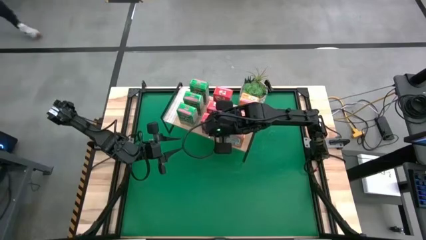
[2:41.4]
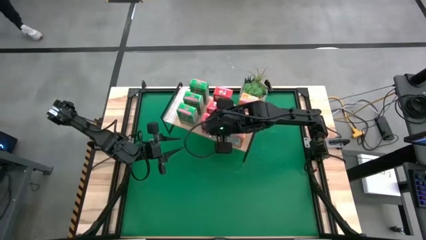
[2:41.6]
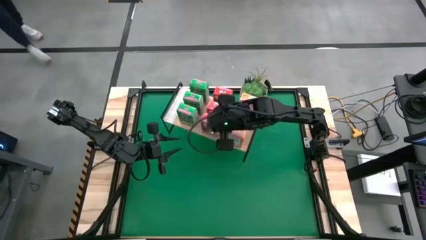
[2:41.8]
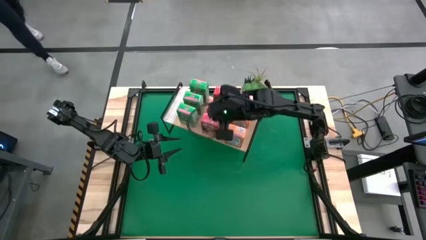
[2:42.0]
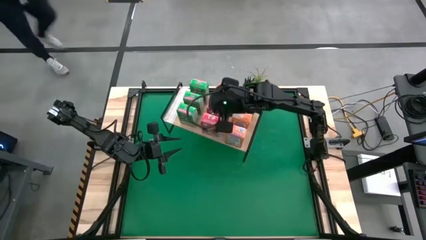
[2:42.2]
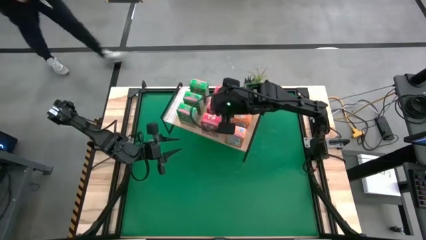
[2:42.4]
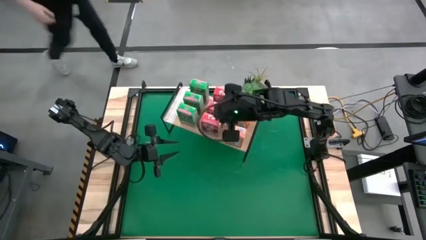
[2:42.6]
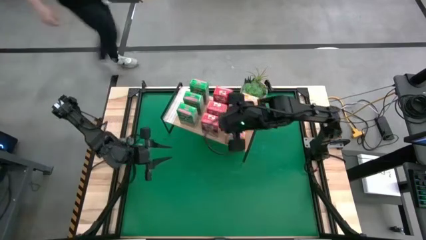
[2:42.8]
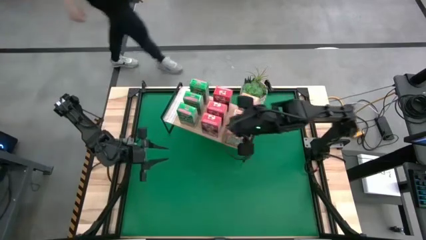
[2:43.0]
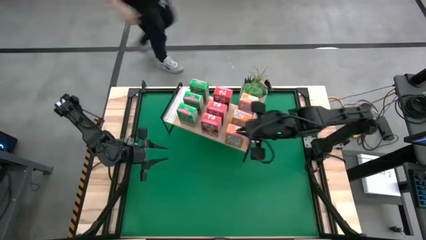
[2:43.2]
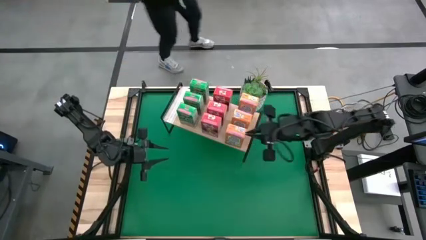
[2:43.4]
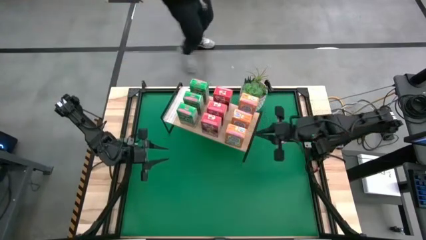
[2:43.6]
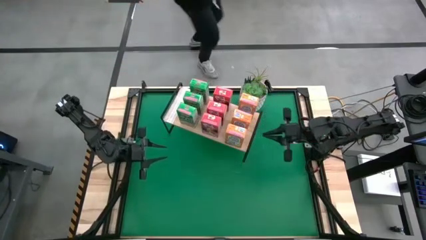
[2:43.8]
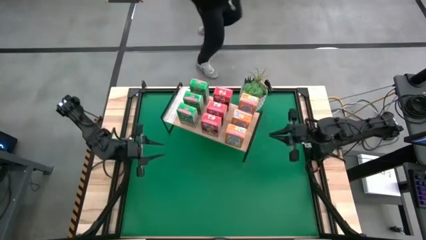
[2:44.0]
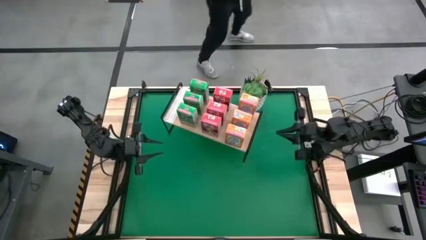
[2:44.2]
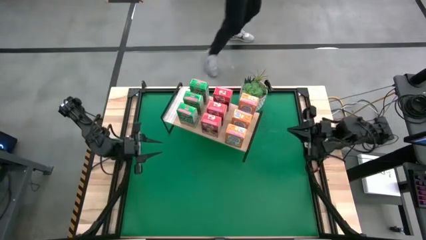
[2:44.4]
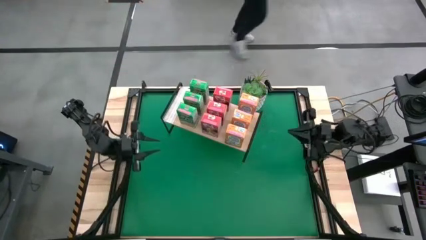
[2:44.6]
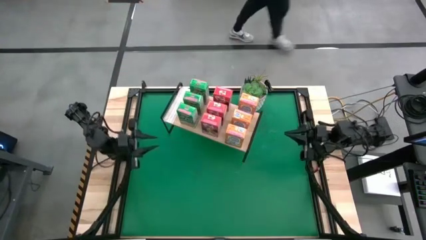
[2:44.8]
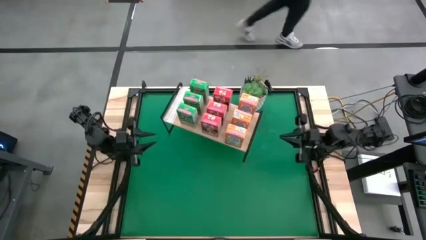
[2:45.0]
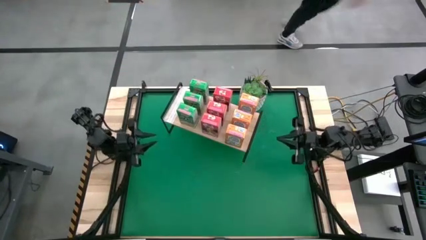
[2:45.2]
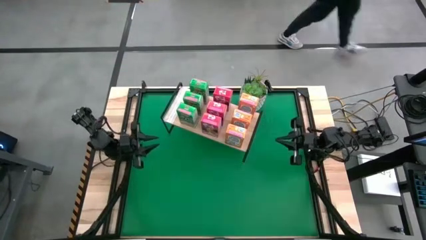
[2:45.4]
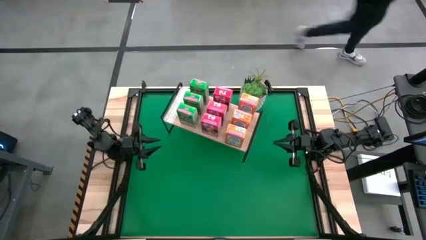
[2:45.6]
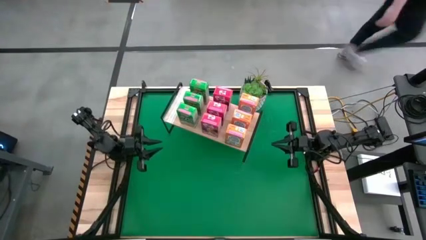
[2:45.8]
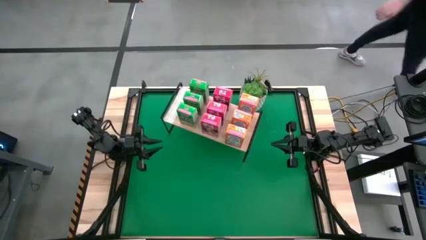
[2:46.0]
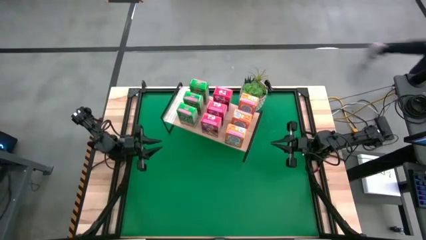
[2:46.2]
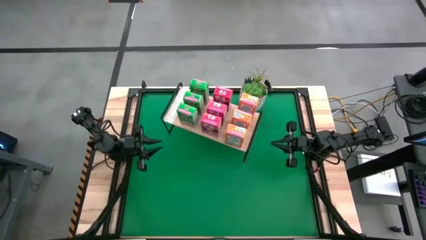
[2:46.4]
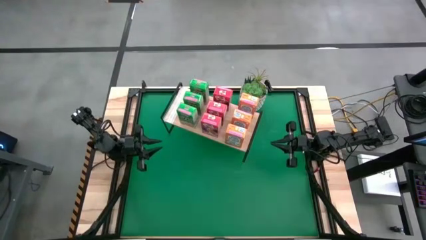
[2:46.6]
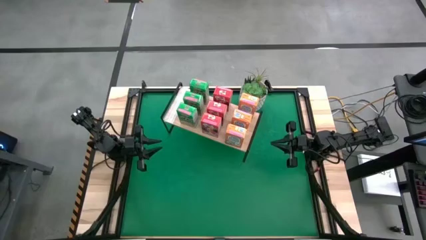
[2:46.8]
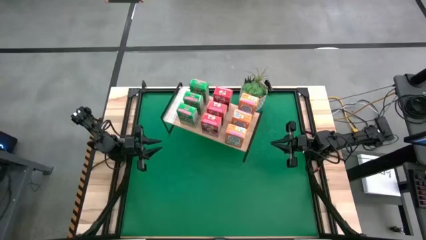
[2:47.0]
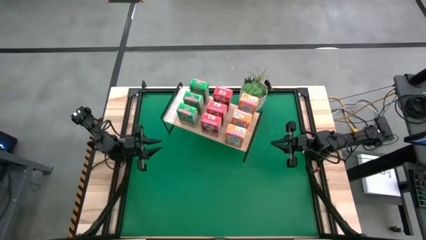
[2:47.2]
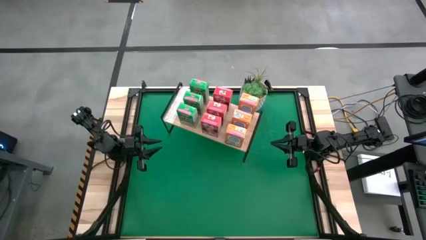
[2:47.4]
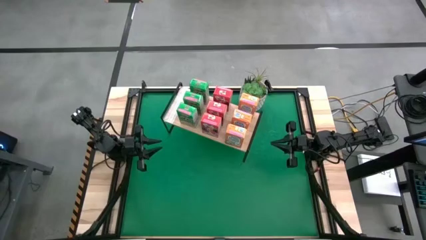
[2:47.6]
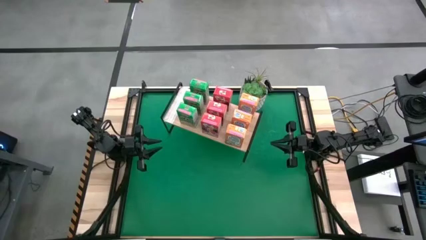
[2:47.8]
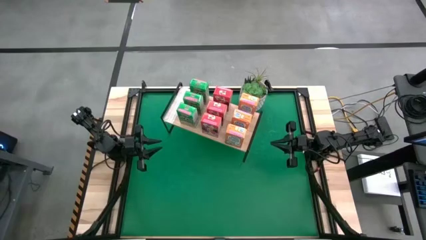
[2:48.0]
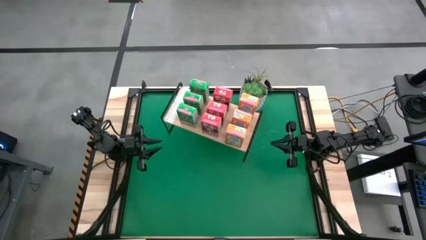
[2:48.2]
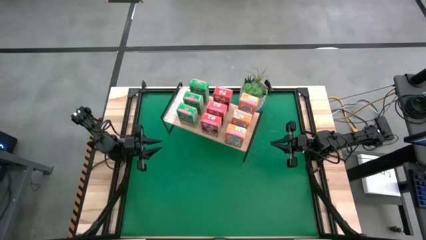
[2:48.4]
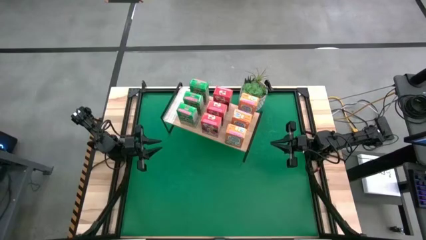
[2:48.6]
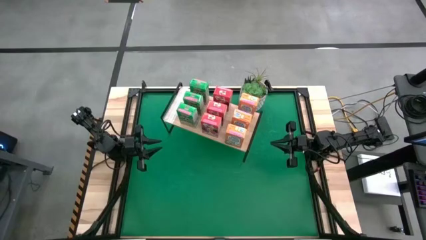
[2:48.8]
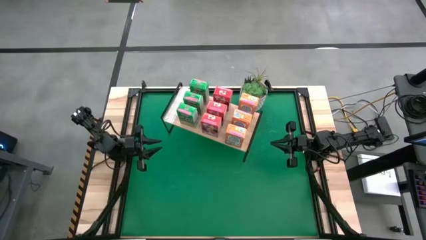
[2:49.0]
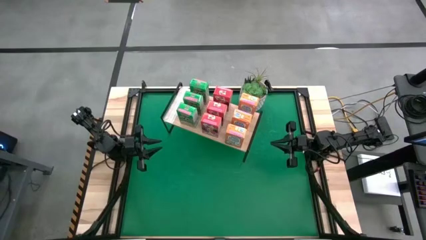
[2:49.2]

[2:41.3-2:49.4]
Task: Stack cereal on shelf
Return to Home Position

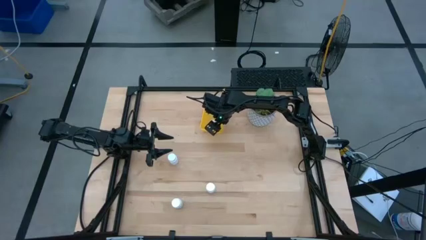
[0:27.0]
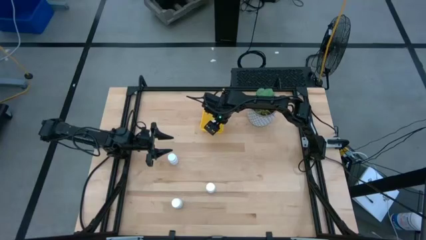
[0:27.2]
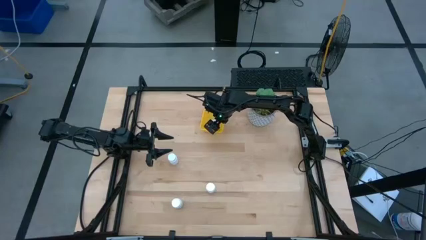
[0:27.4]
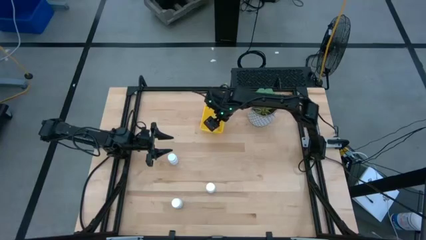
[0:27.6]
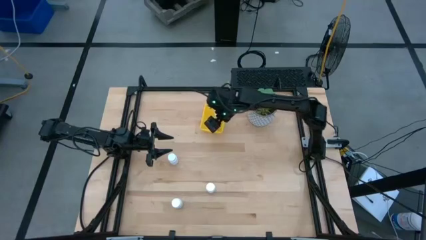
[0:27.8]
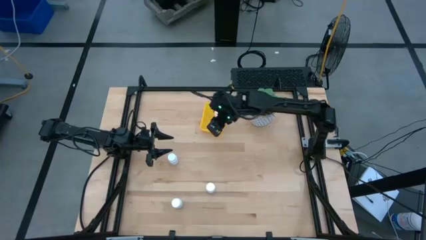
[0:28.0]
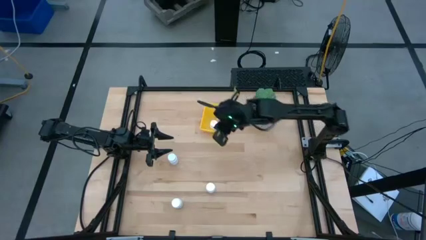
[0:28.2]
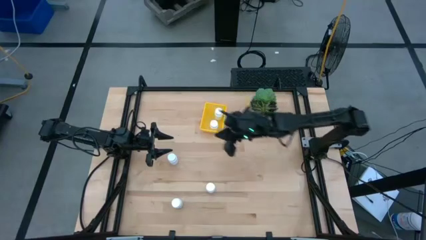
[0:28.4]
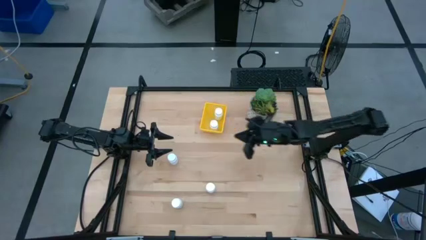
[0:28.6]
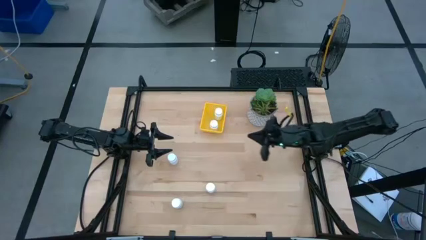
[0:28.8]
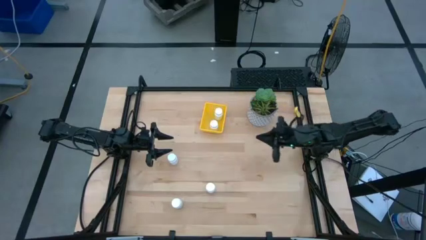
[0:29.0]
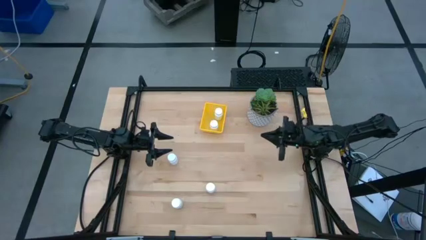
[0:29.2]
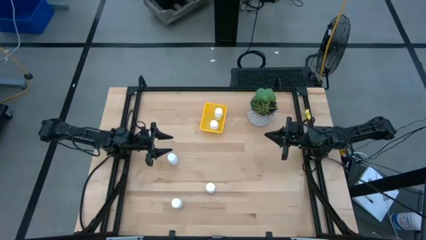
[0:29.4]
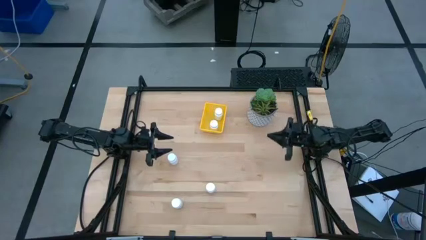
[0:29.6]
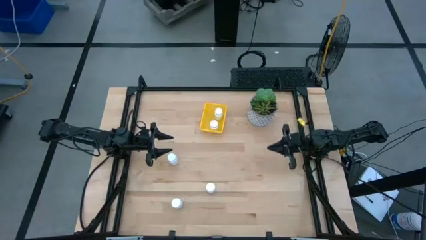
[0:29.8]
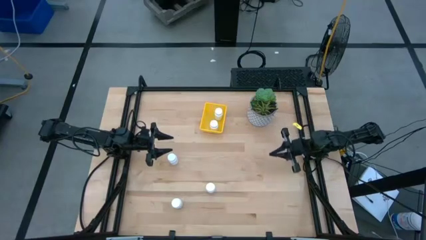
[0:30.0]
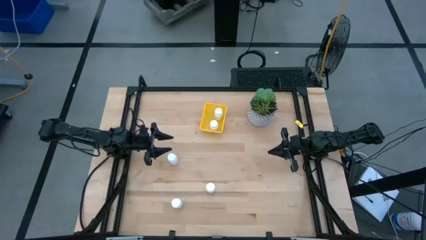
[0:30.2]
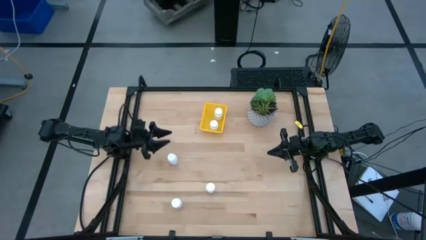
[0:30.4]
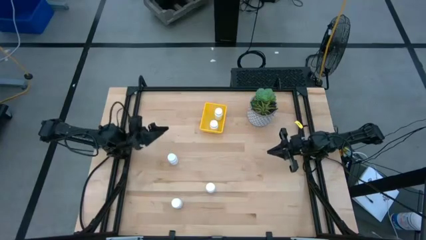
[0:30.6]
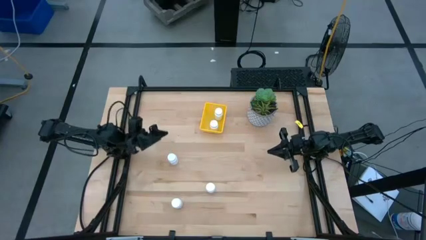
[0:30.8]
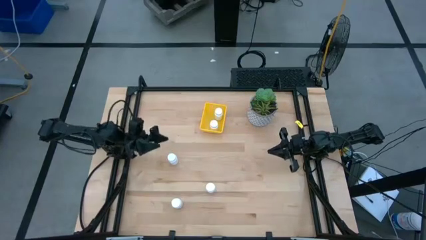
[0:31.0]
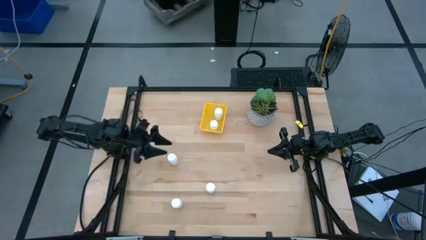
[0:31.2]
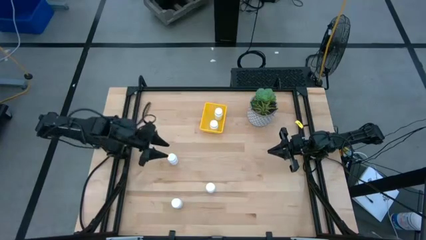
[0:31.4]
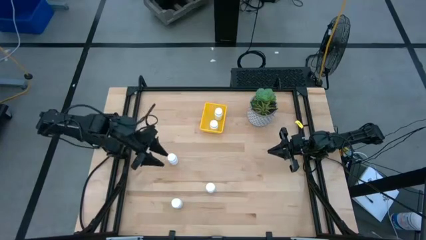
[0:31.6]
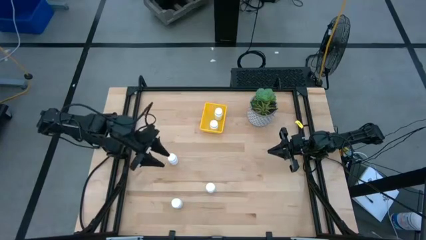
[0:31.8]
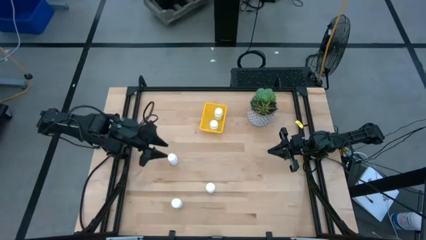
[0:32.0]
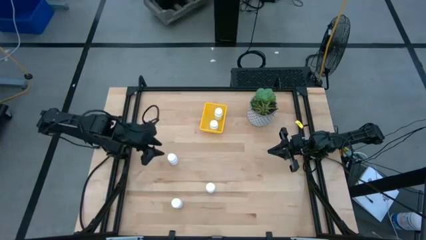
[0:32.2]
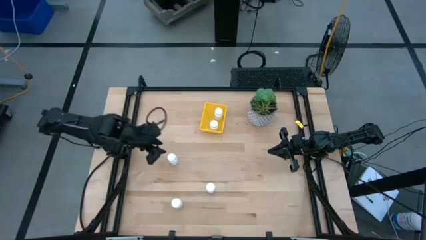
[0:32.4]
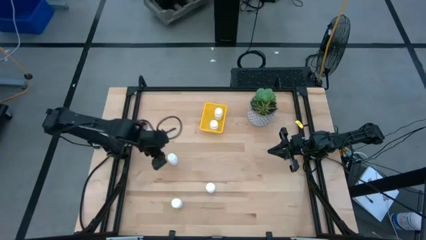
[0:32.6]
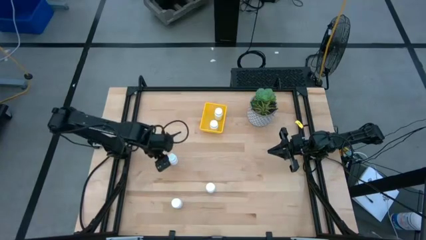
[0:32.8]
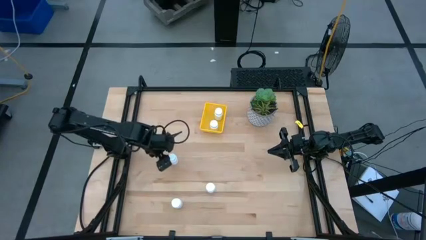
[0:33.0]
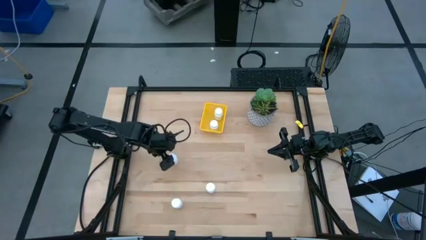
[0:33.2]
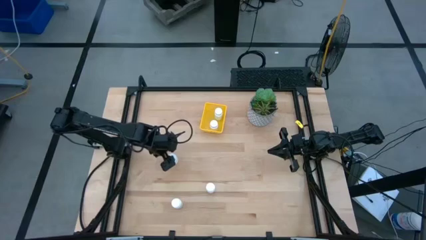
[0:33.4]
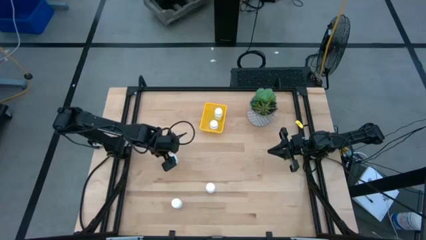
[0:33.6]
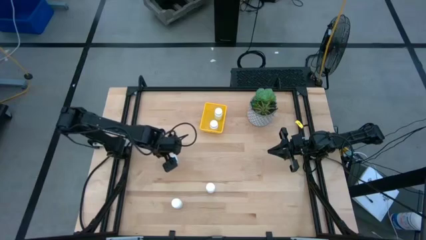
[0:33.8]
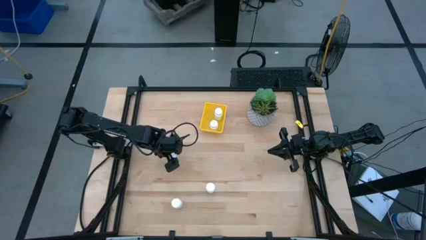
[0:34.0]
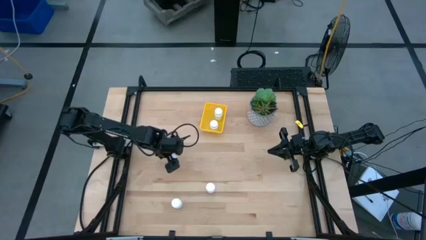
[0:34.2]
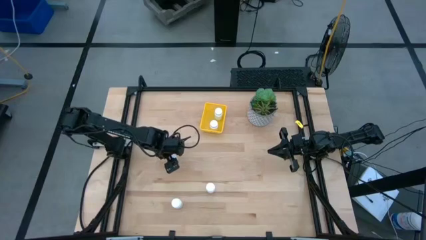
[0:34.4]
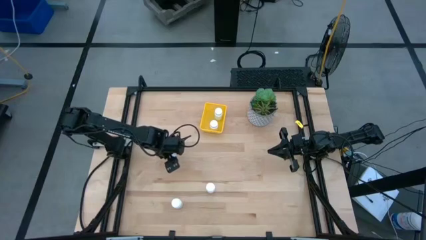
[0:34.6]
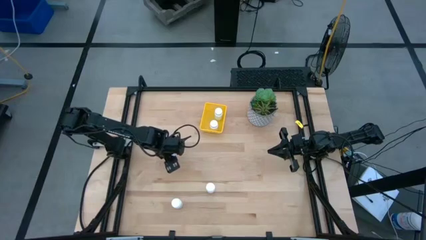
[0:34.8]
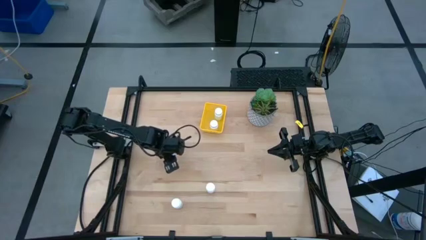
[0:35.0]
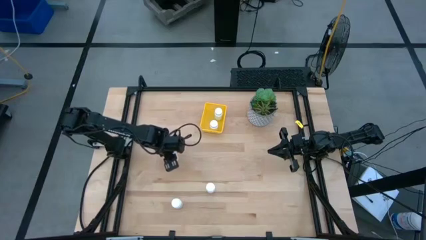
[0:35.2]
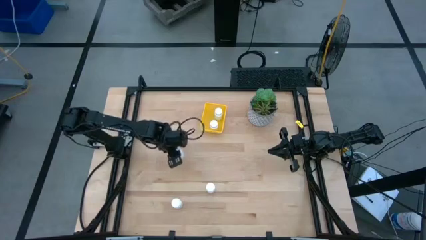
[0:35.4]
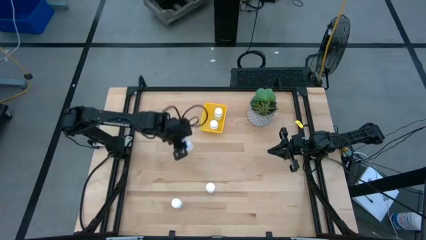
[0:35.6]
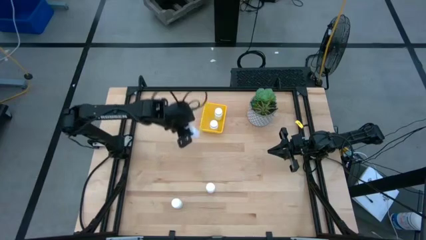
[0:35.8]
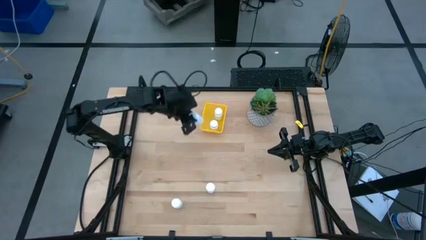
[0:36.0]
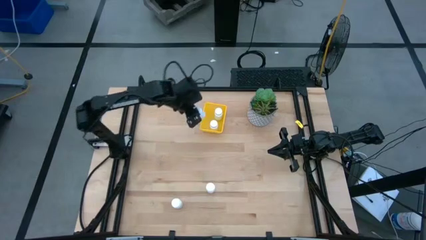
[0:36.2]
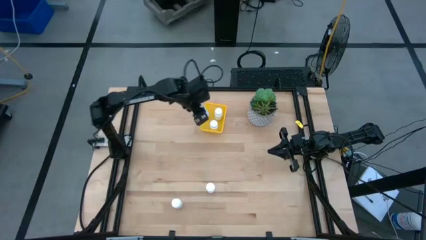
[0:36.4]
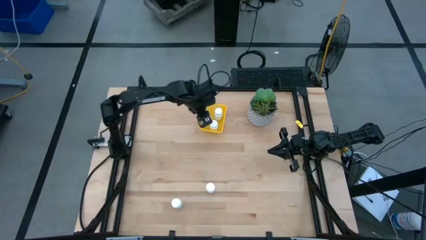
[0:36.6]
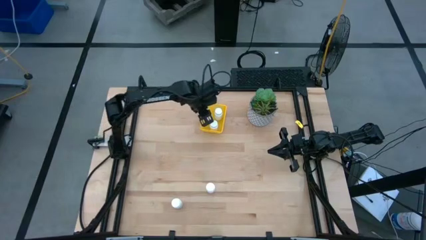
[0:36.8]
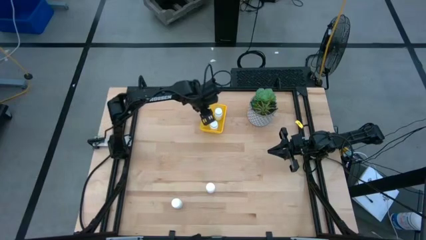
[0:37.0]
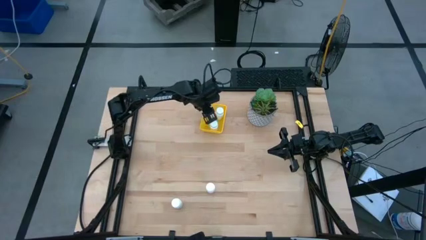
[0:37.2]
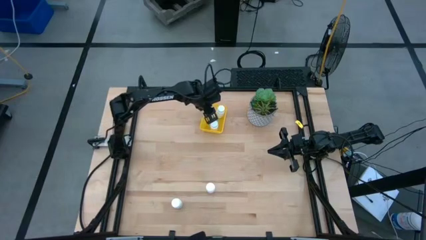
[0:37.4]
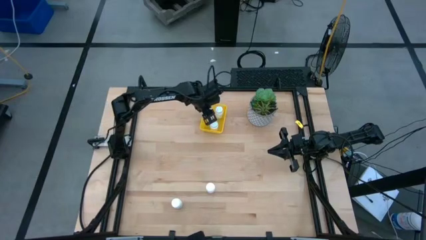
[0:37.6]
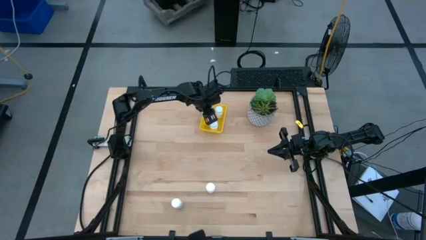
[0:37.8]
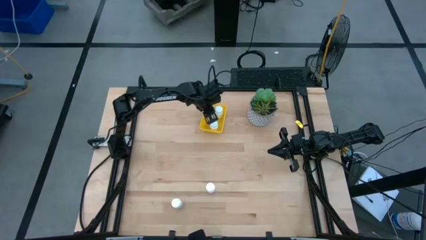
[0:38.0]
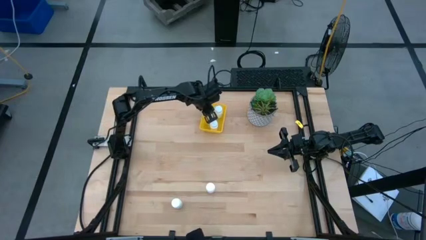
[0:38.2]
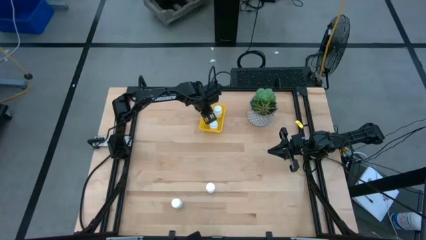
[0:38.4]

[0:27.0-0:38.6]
Task: Pick and place pill bottles into a basket
Put the white pill bottle into the yellow basket
